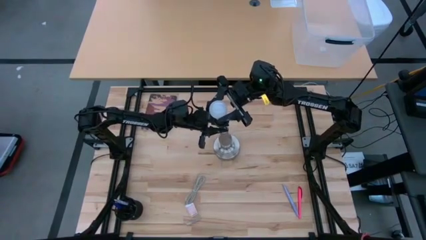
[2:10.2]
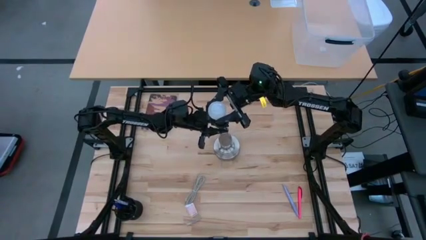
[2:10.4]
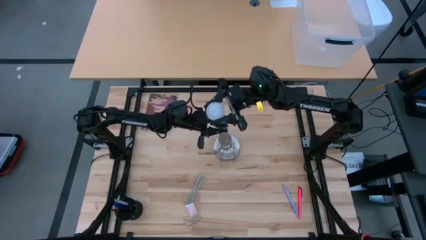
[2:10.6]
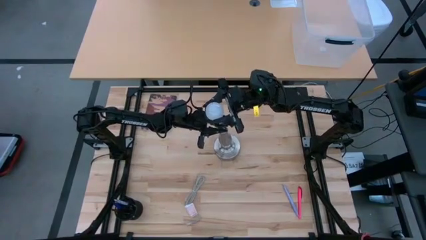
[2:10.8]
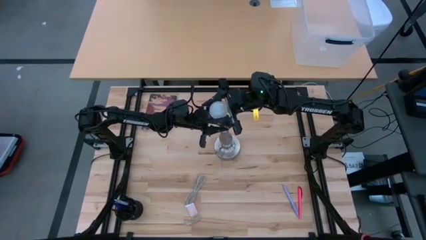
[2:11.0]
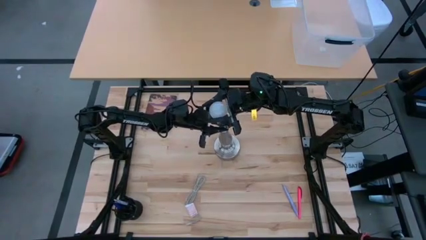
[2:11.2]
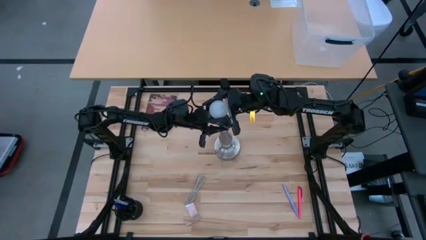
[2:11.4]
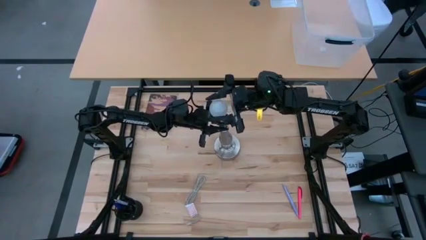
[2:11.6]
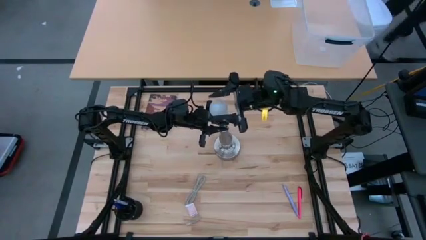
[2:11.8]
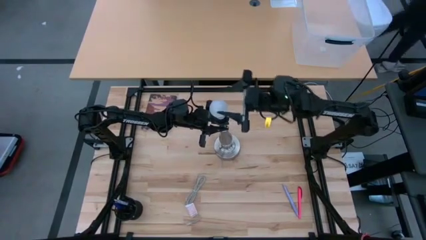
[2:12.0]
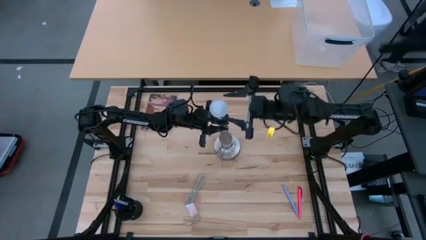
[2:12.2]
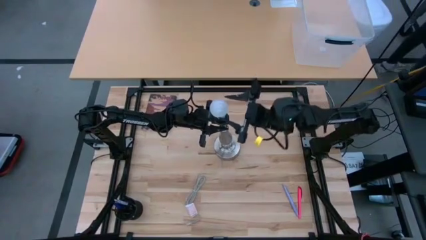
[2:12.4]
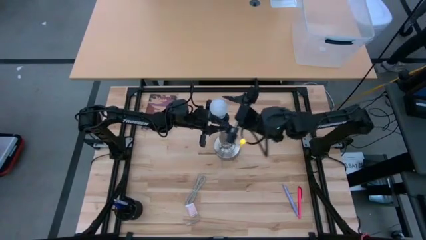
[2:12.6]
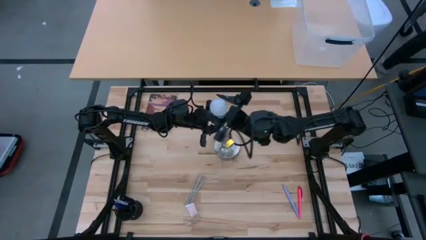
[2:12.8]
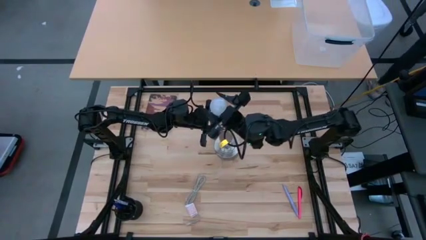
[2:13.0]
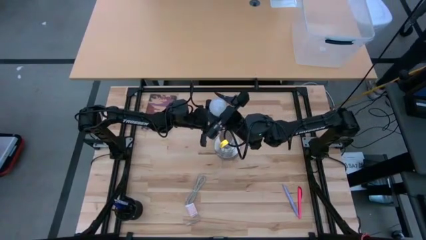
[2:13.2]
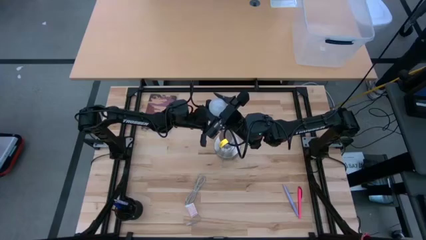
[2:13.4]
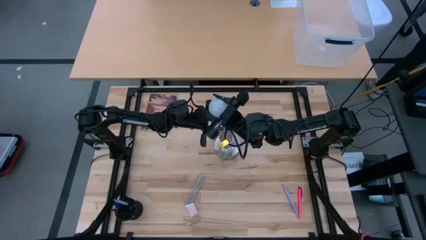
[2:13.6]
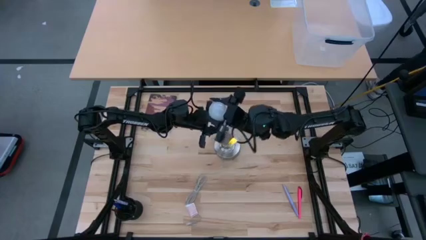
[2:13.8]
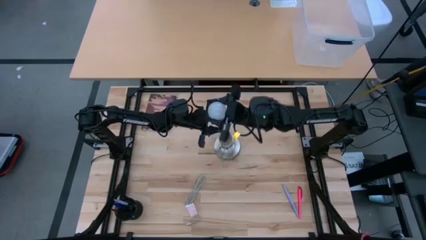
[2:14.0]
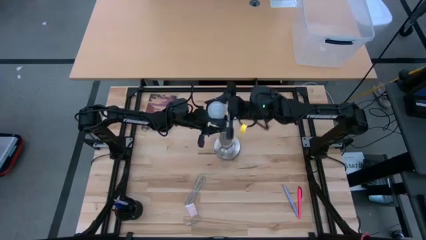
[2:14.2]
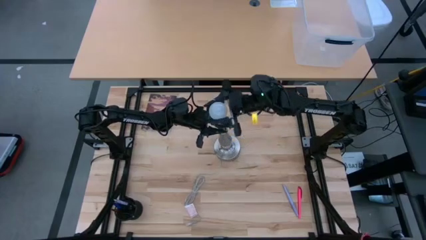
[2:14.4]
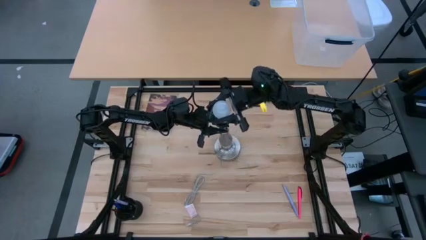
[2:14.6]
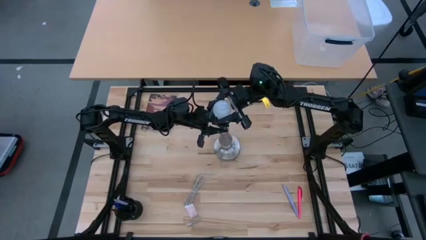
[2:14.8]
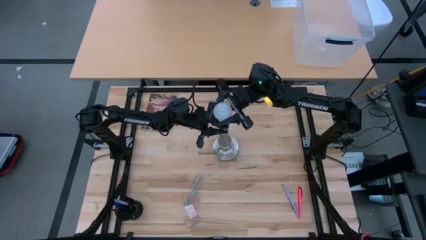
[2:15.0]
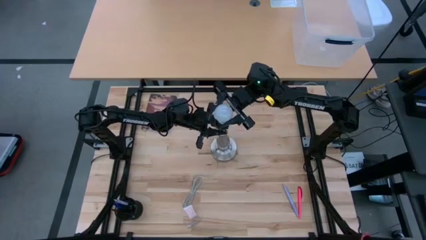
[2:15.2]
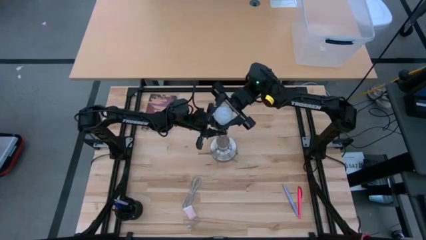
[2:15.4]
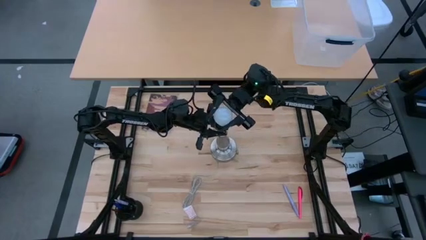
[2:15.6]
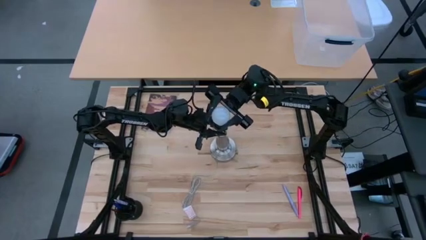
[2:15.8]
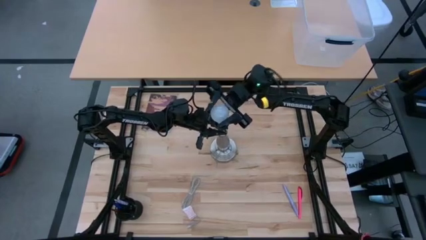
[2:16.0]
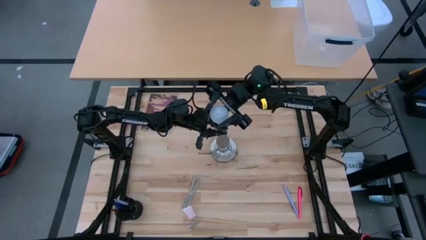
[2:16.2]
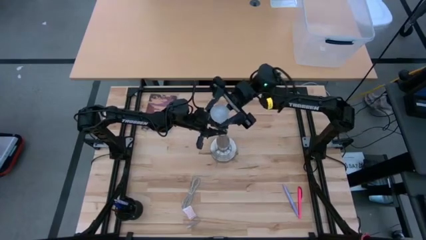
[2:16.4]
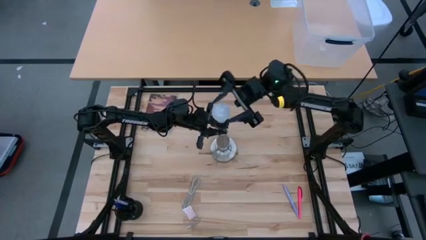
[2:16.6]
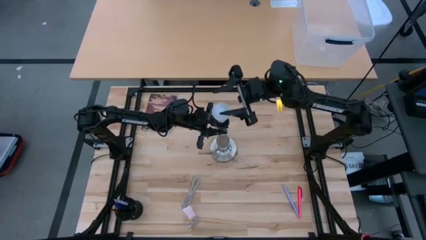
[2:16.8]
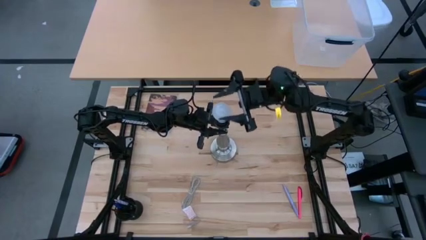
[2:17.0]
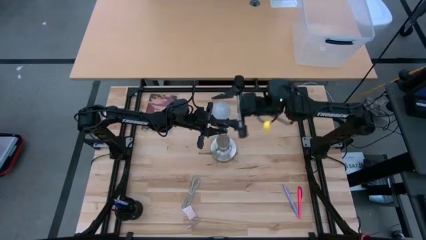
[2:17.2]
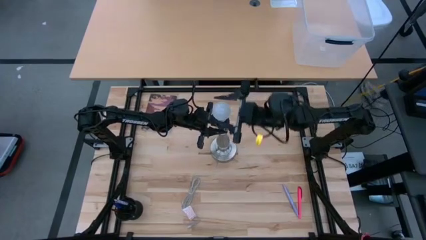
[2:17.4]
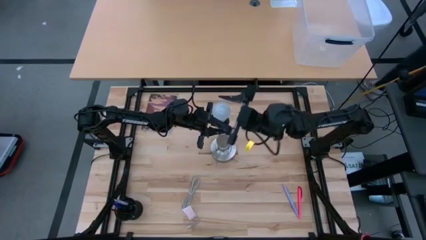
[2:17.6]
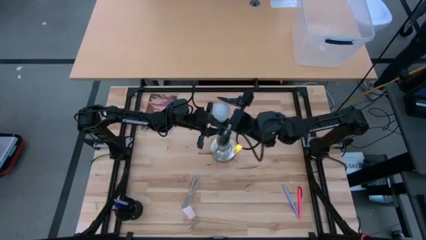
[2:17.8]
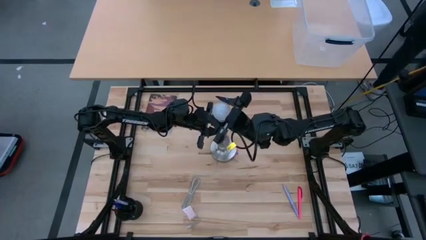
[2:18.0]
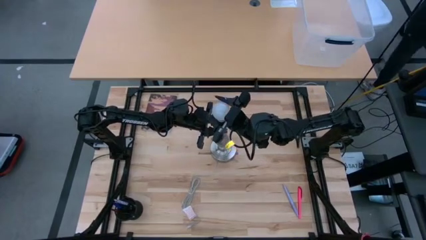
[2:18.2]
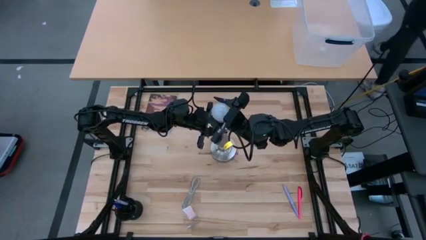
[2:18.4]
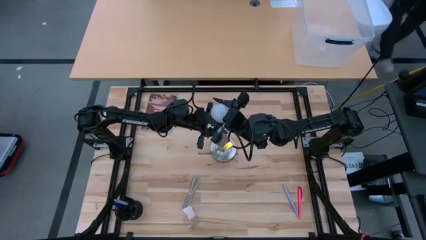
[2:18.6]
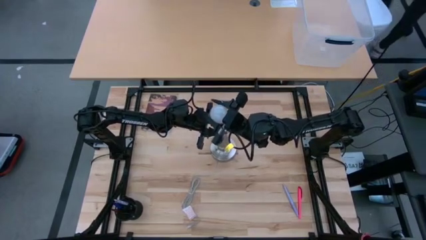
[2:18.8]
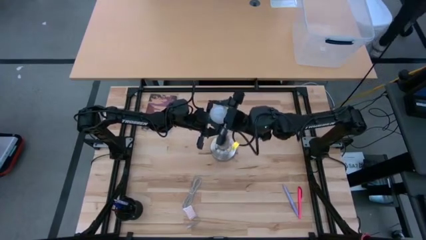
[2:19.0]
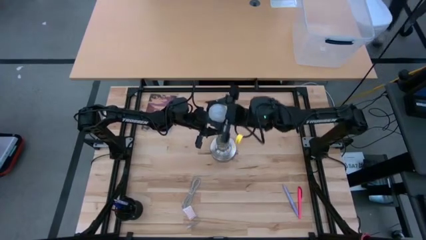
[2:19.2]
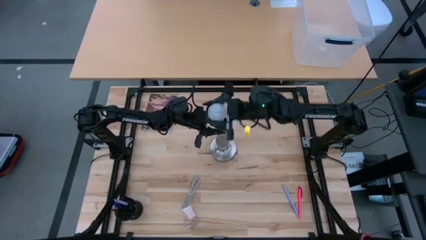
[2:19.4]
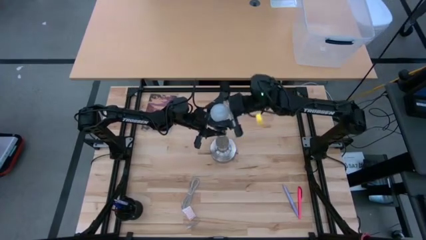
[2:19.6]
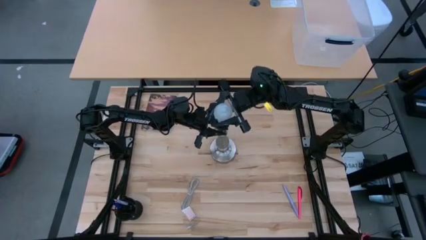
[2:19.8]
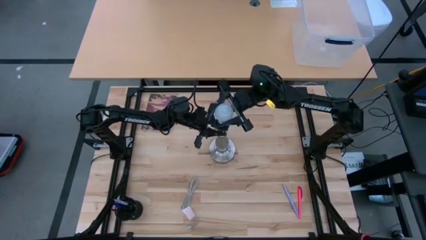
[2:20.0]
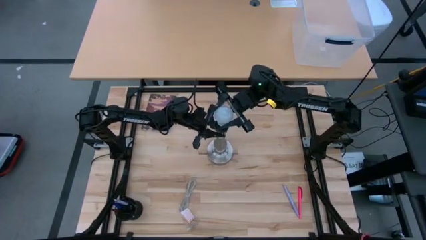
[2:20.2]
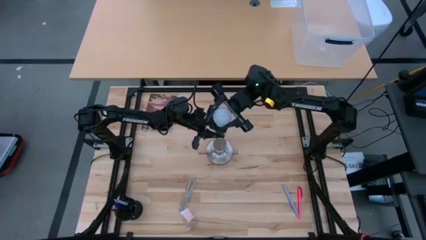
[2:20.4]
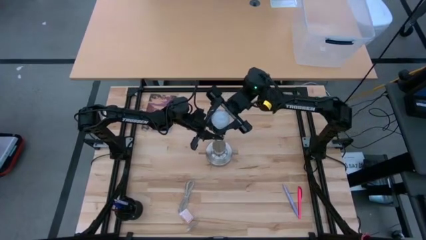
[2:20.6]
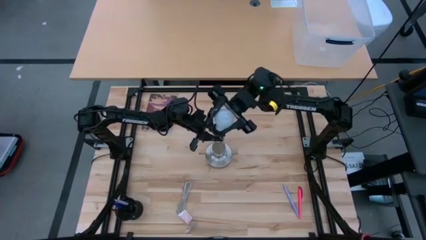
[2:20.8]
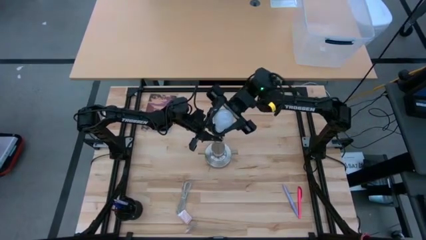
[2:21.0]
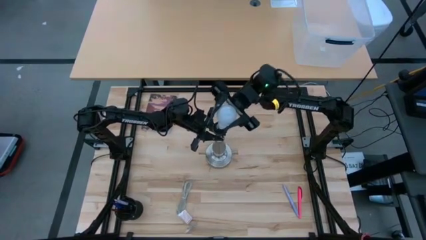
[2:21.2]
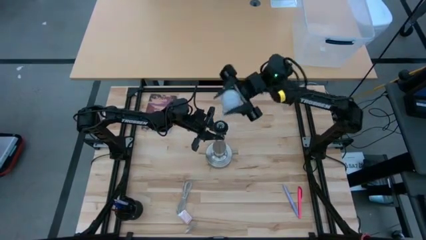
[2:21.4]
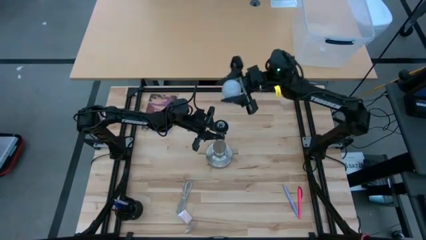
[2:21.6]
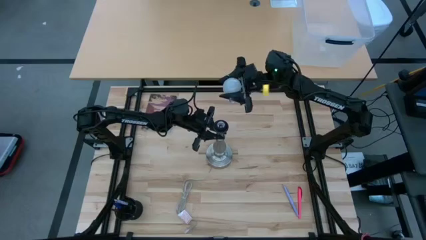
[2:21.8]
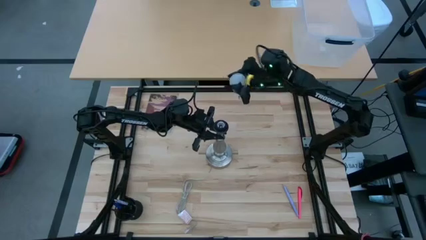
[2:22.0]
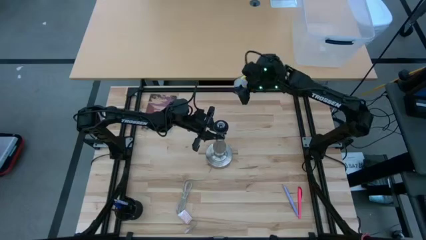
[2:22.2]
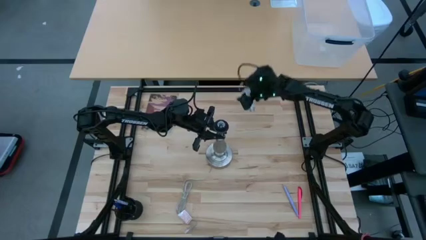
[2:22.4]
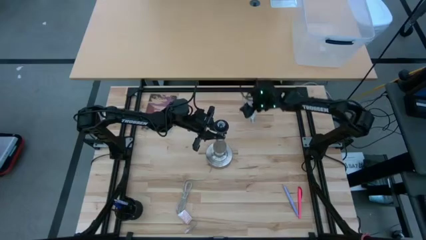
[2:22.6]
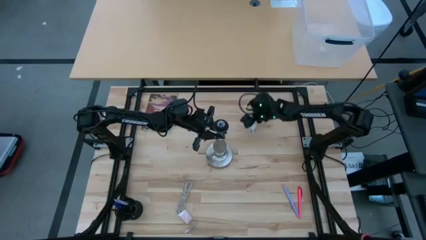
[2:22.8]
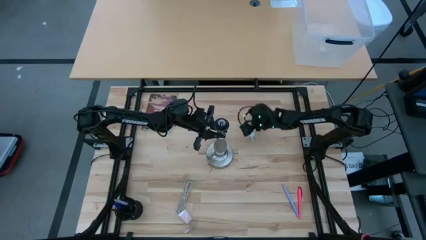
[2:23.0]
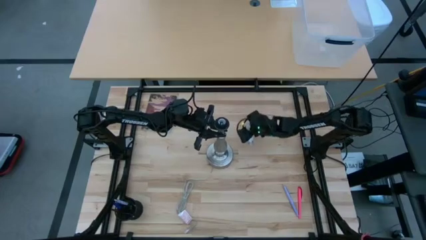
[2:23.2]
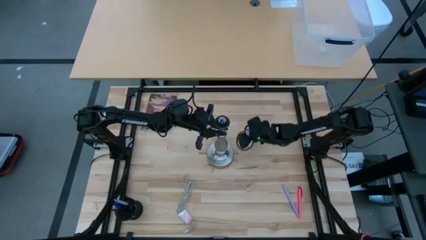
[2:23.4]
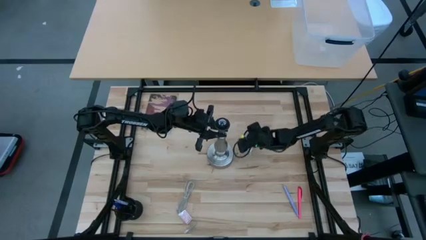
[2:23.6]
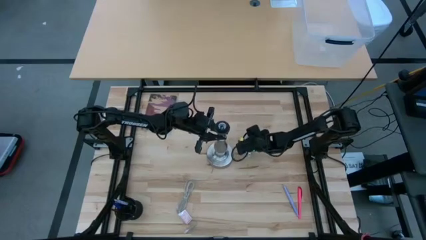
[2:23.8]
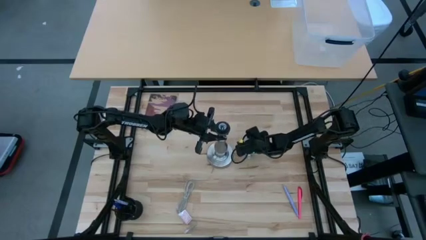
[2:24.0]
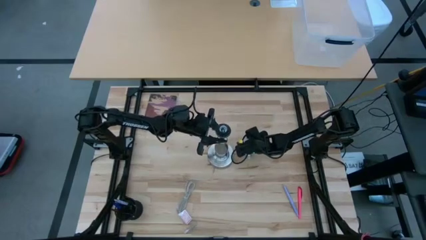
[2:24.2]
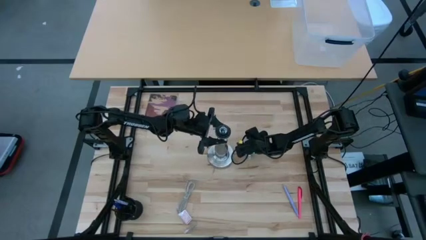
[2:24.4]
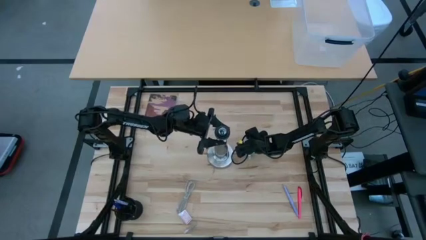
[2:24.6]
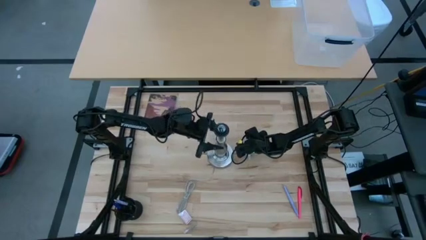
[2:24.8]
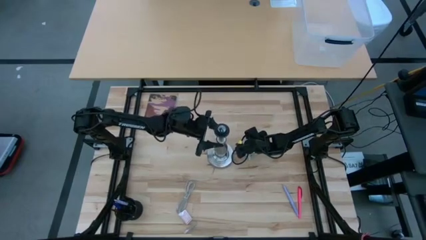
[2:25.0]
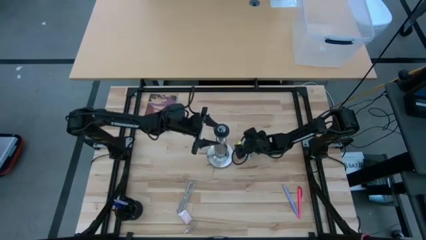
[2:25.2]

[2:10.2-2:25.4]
Task: Screw lightbulb
Remove the lightbulb from the silver lamp and put it on the table
